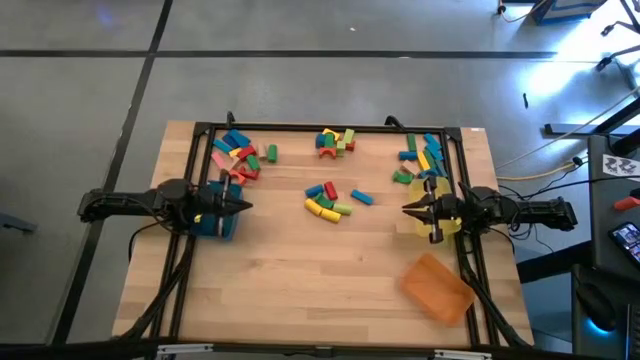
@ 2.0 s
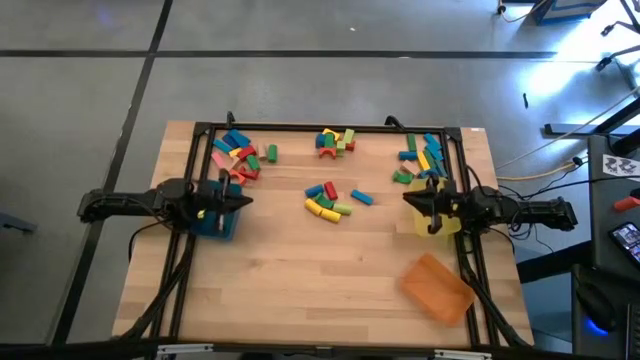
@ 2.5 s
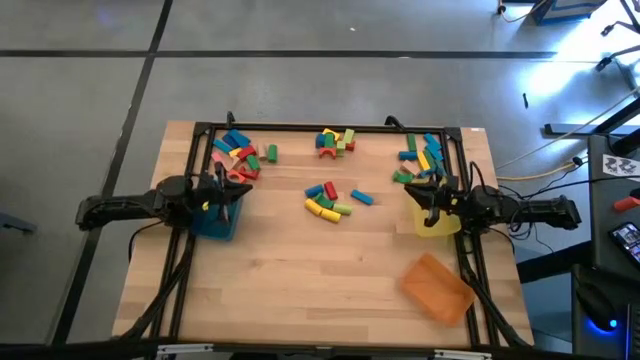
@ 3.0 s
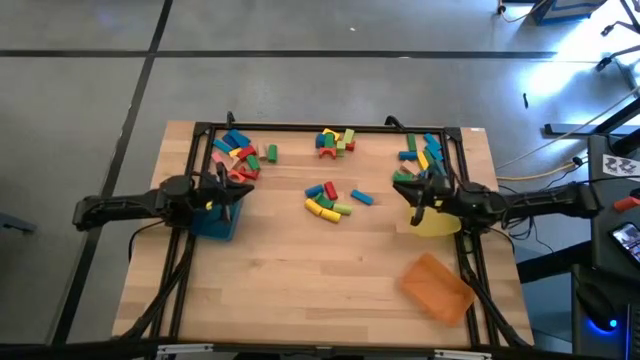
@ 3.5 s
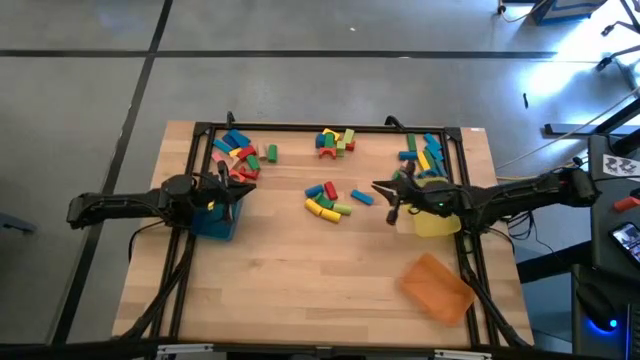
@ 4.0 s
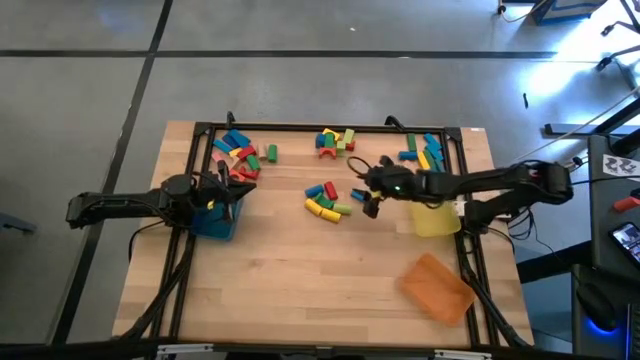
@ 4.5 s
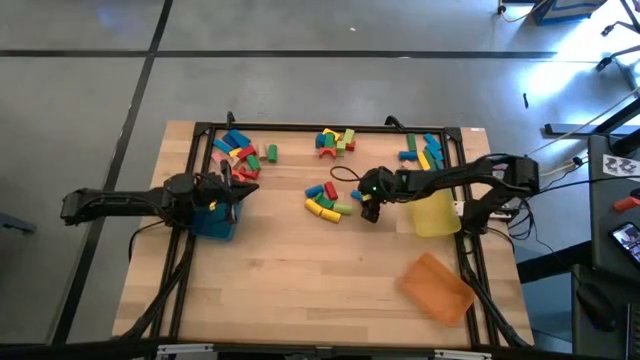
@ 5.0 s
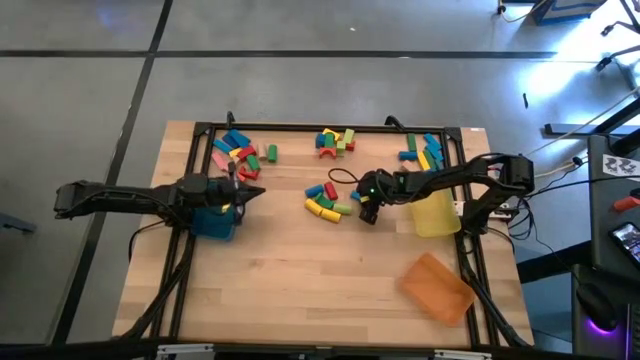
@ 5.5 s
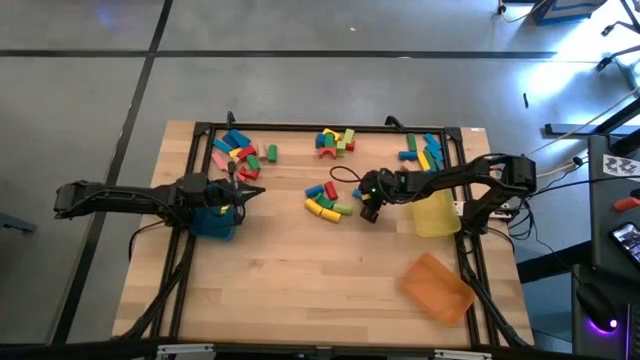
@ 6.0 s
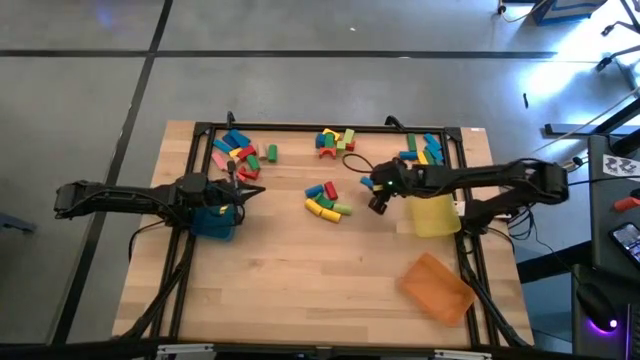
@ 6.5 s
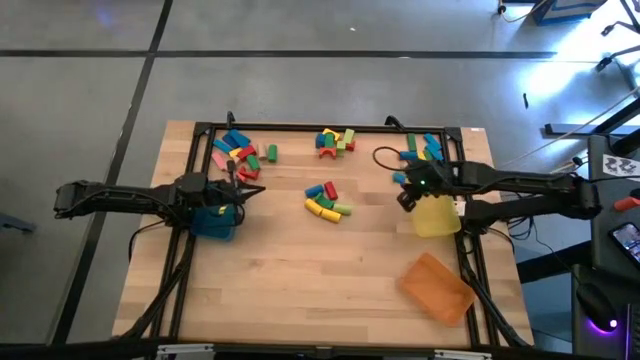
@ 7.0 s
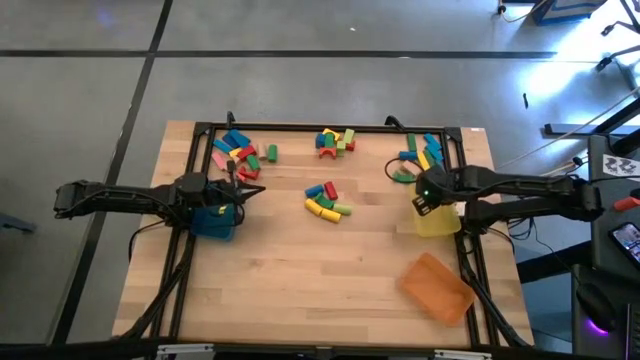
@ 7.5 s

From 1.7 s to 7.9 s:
Task: Sort blocks by size
Put the blue rectangular block into the yellow bin

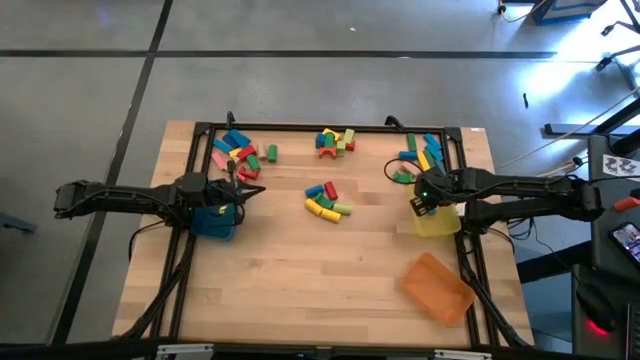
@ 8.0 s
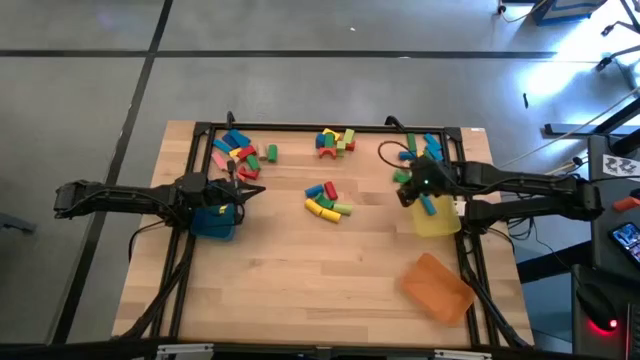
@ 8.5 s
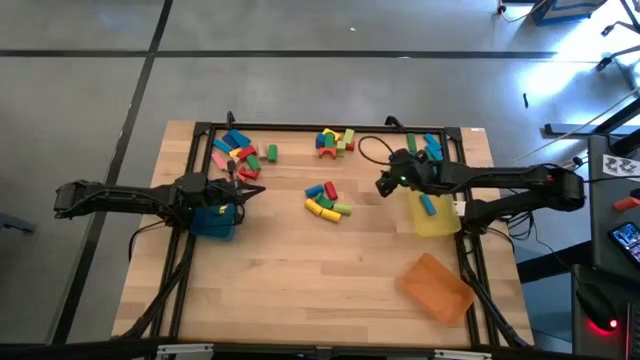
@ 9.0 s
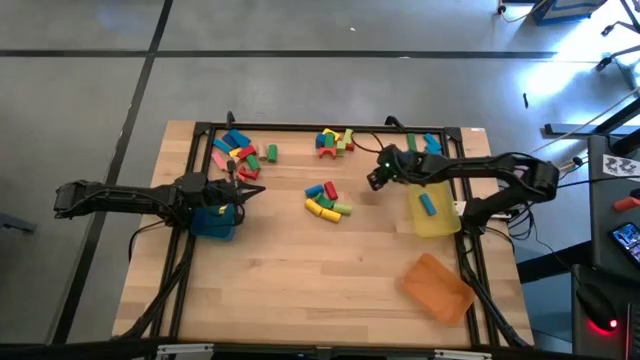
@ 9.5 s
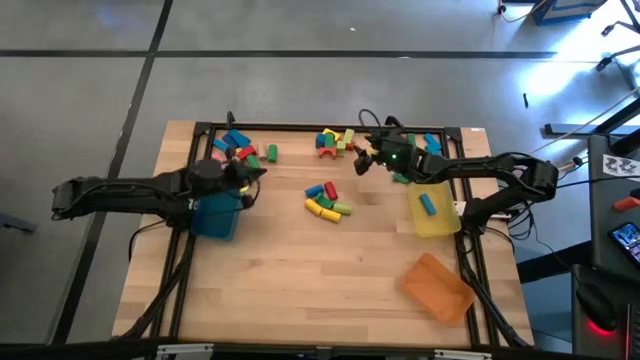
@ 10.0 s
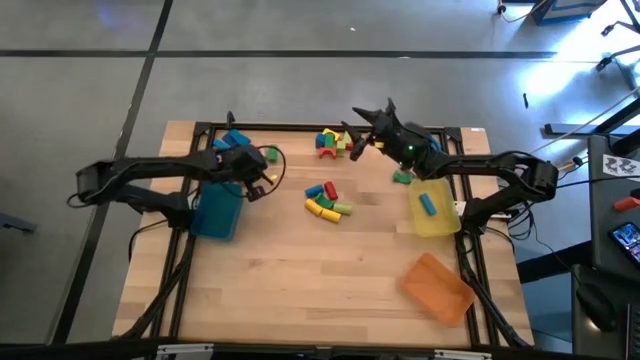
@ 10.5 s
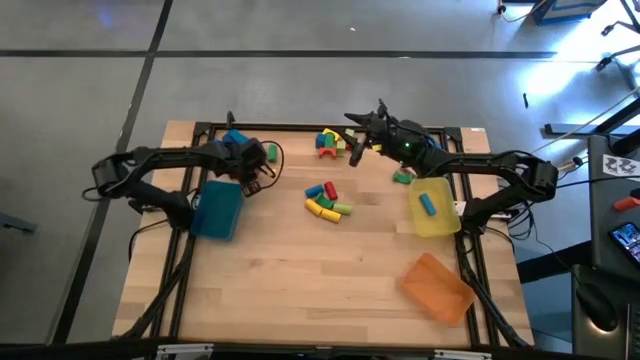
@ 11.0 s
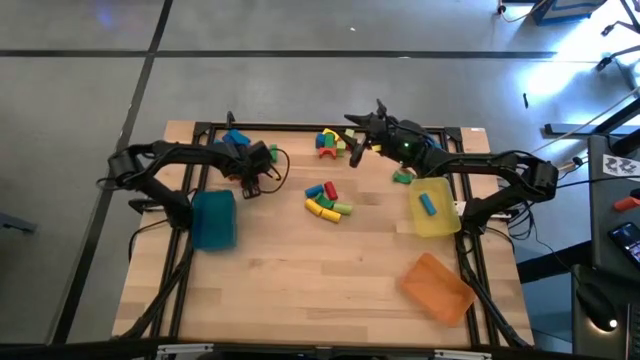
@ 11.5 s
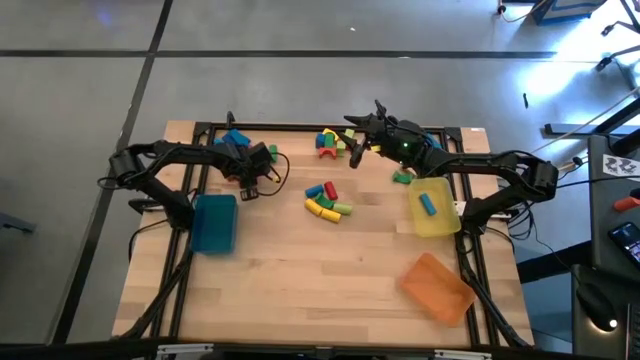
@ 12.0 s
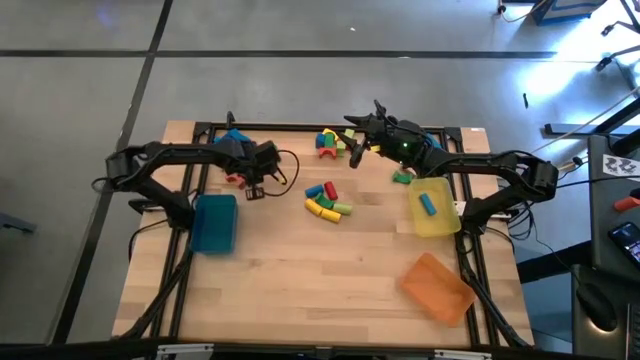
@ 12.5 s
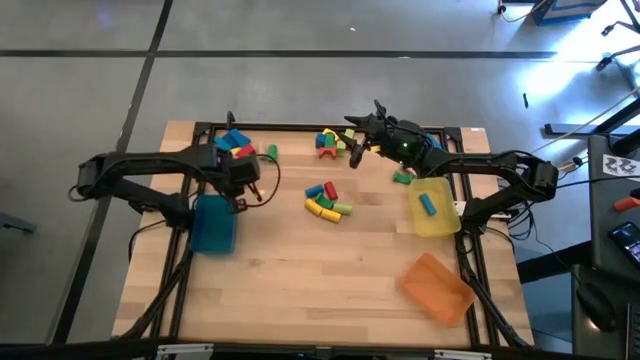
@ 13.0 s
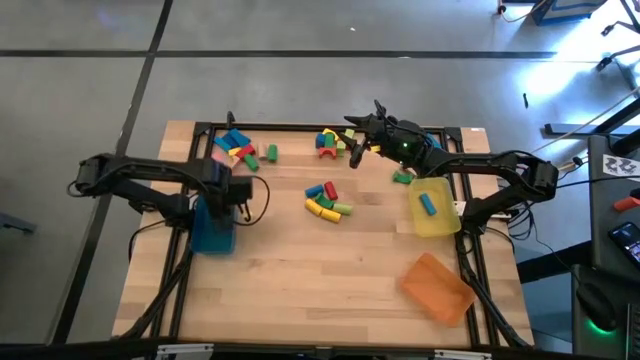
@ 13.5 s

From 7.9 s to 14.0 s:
Put the red arch block into the blue bin

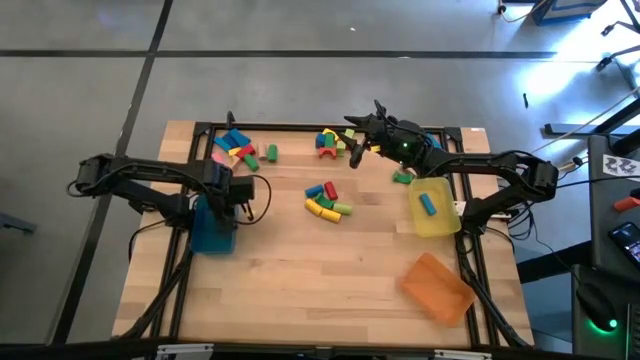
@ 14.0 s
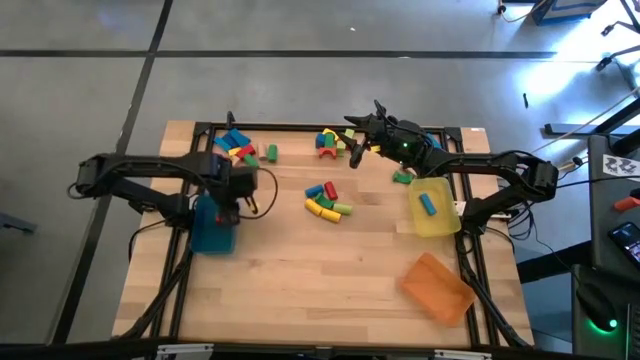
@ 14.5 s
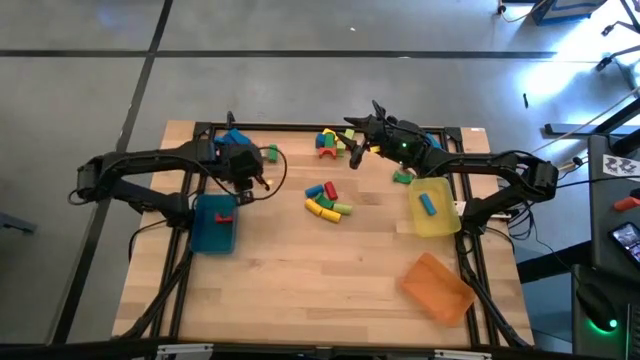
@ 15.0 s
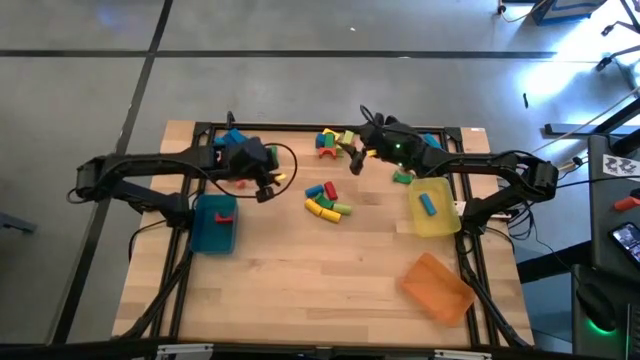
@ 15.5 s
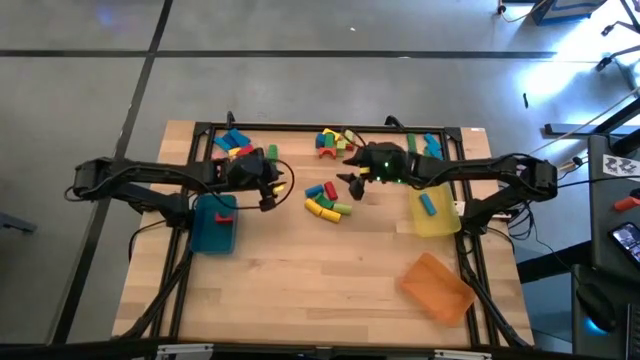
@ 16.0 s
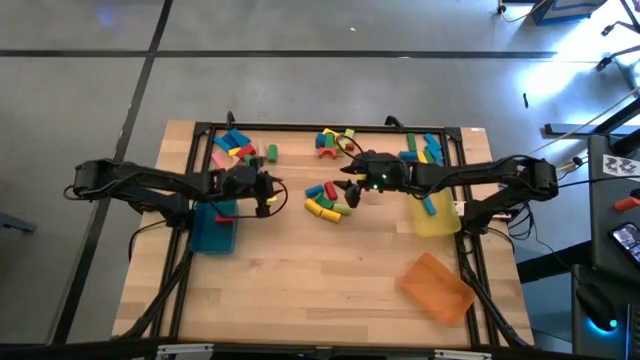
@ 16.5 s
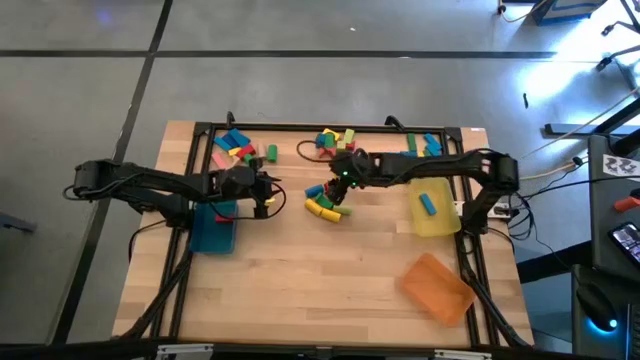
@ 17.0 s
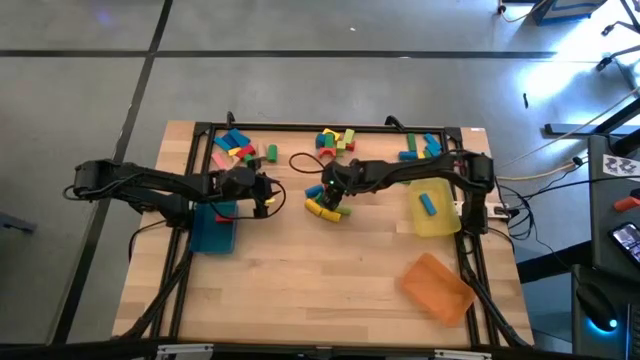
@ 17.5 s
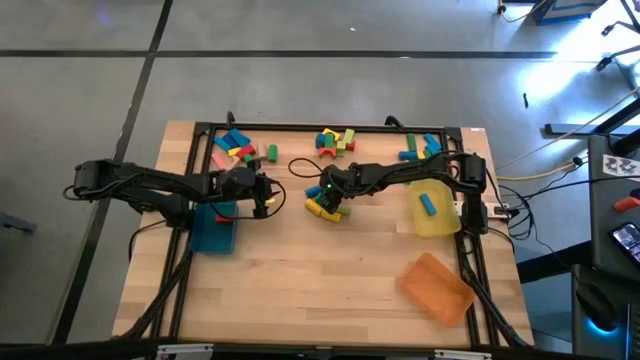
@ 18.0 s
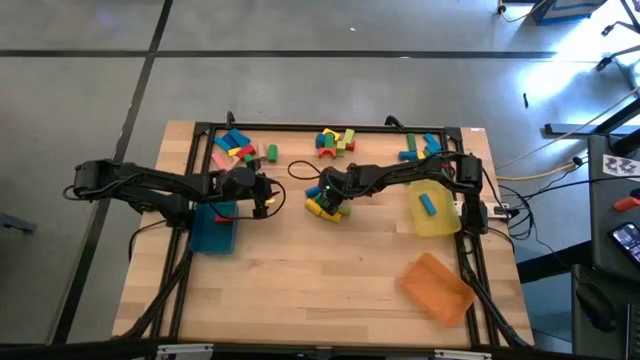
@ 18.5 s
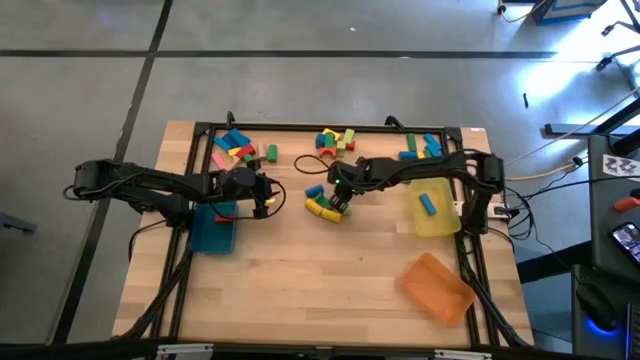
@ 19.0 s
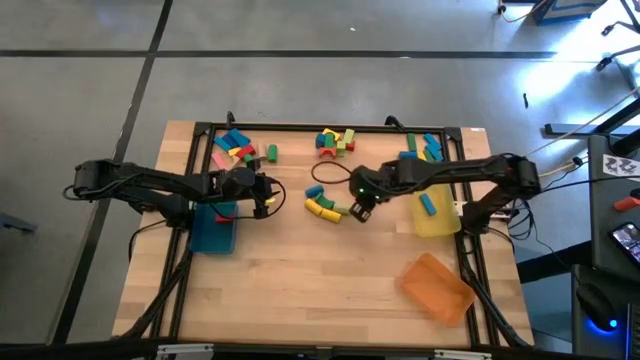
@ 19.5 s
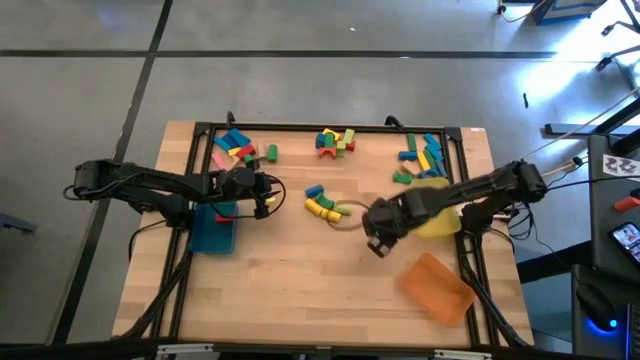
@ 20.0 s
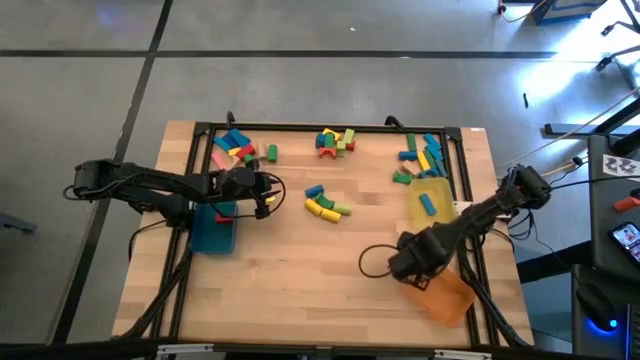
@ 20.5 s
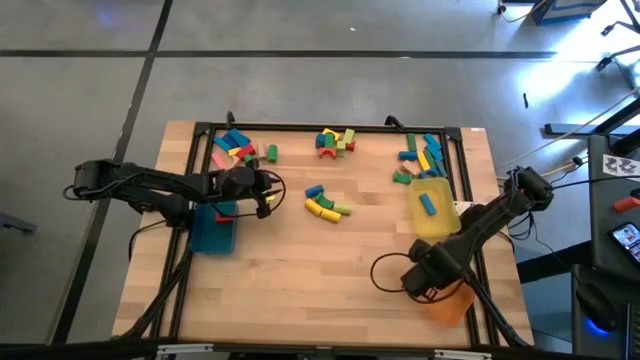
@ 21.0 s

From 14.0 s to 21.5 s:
Put the red cylindrical block into the orange bin

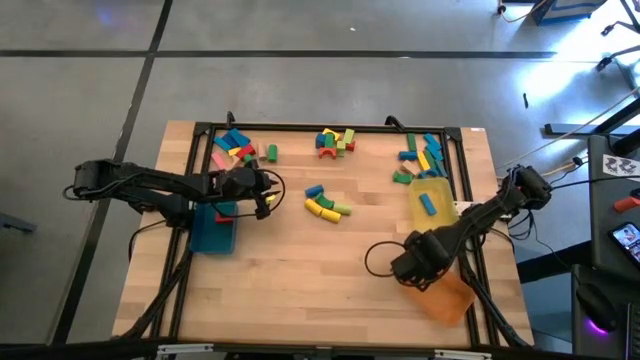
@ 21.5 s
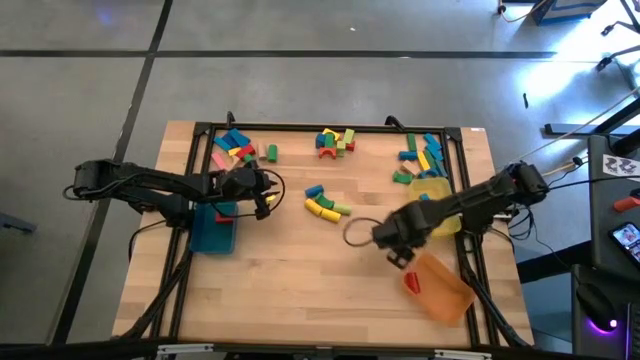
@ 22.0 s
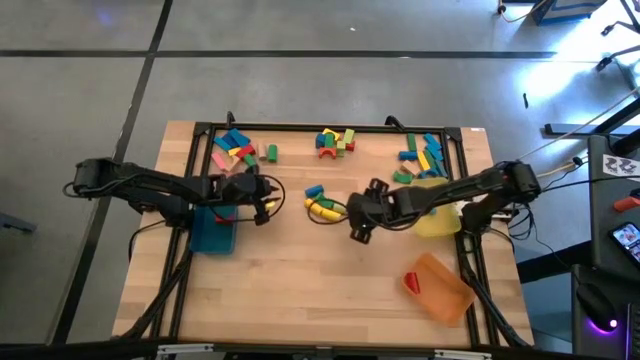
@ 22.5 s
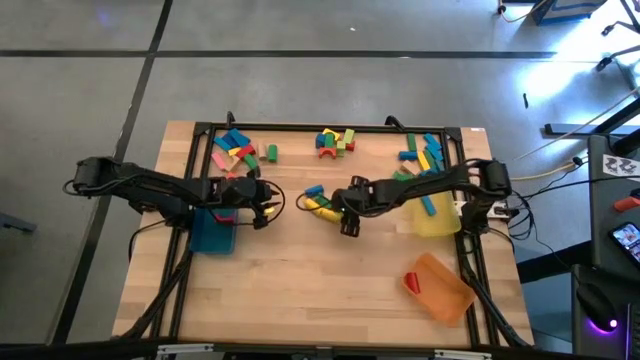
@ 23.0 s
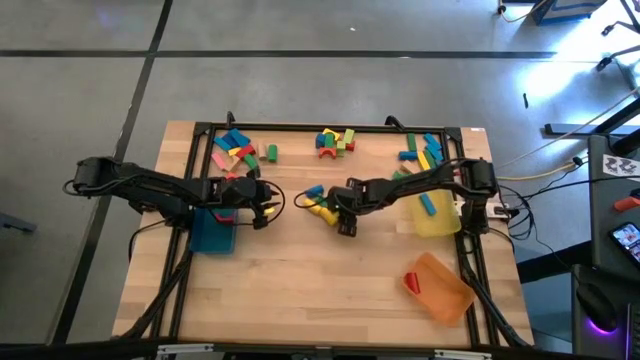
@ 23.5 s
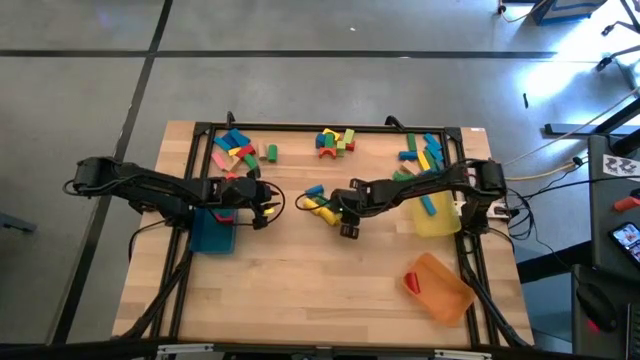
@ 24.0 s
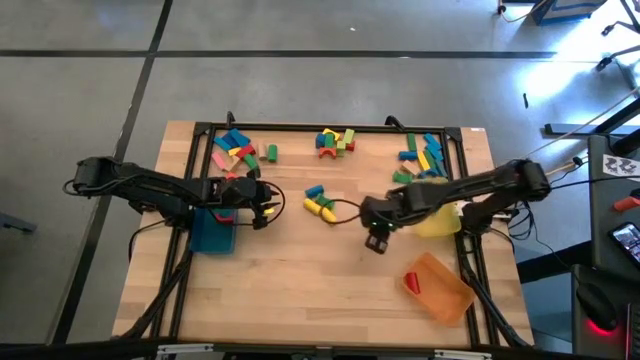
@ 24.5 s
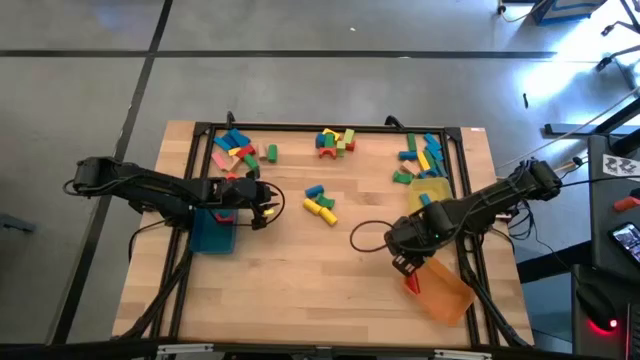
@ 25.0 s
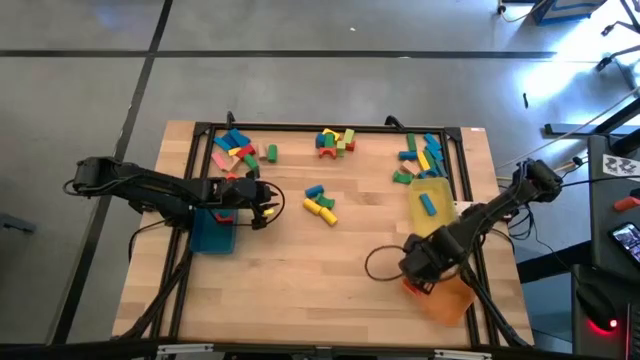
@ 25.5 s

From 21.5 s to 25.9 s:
Put the light green cylindrical block into the orange bin
